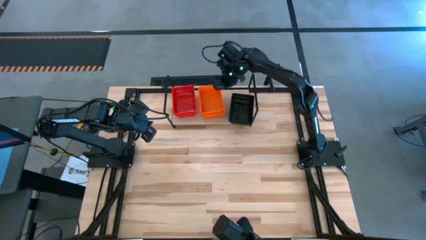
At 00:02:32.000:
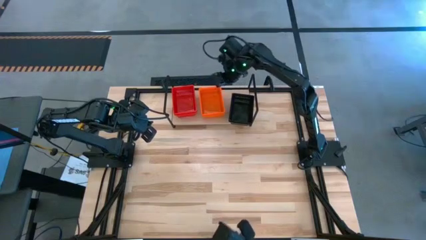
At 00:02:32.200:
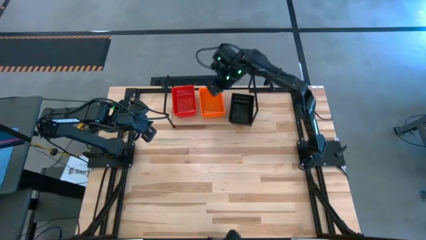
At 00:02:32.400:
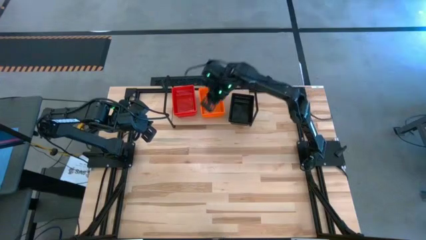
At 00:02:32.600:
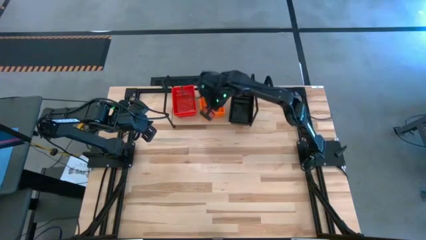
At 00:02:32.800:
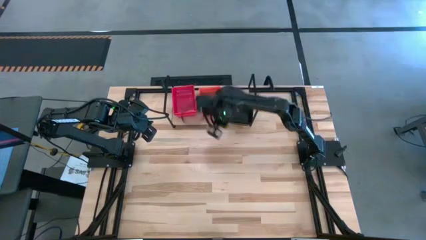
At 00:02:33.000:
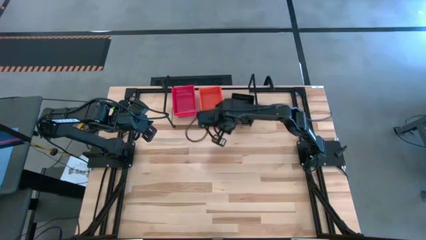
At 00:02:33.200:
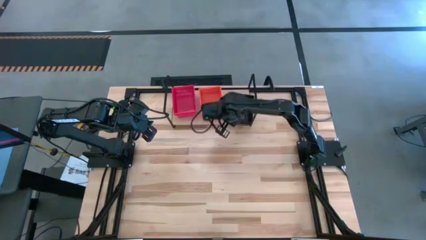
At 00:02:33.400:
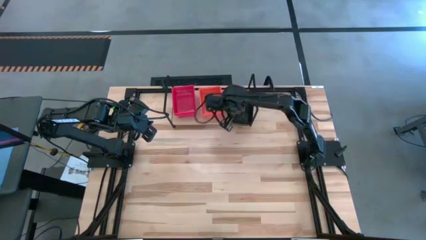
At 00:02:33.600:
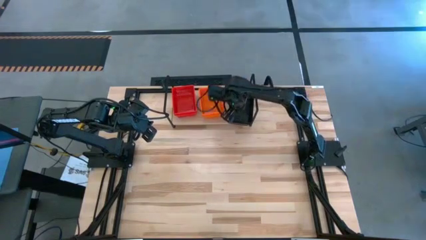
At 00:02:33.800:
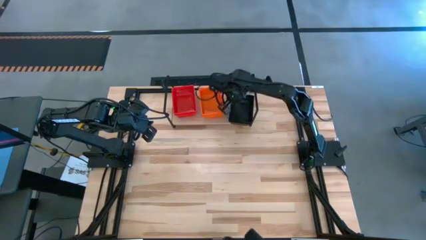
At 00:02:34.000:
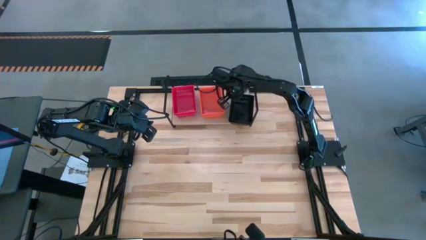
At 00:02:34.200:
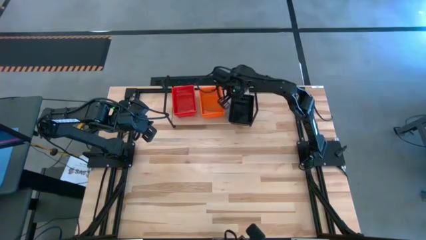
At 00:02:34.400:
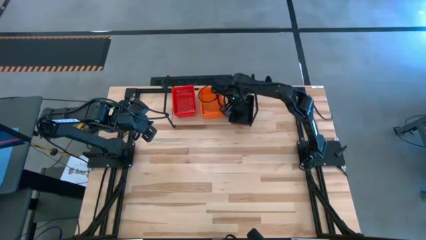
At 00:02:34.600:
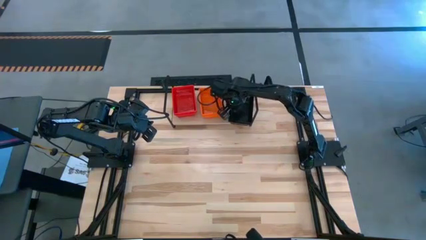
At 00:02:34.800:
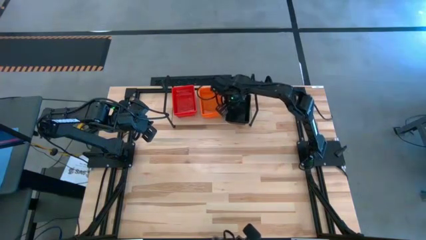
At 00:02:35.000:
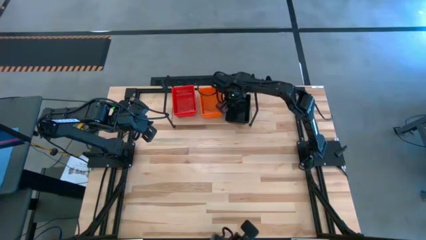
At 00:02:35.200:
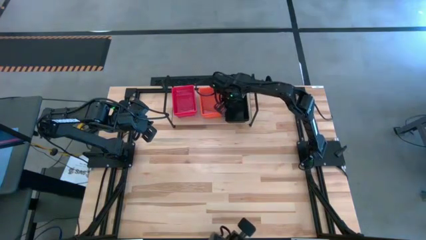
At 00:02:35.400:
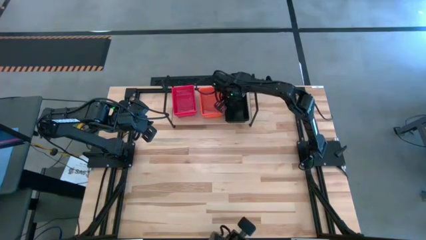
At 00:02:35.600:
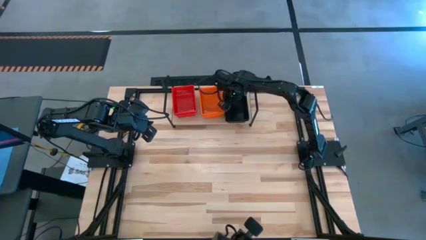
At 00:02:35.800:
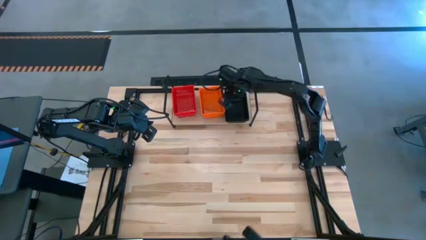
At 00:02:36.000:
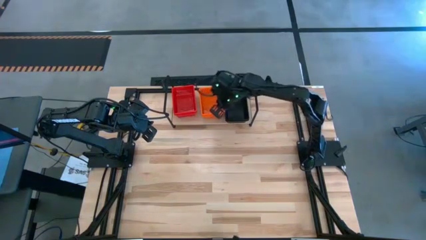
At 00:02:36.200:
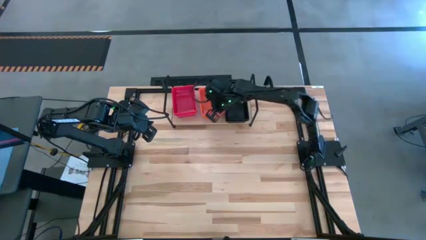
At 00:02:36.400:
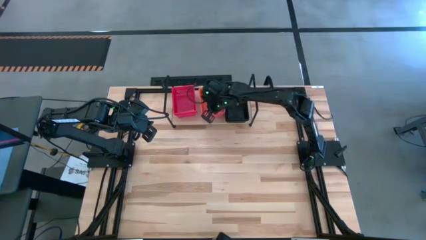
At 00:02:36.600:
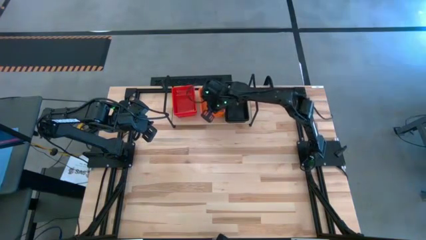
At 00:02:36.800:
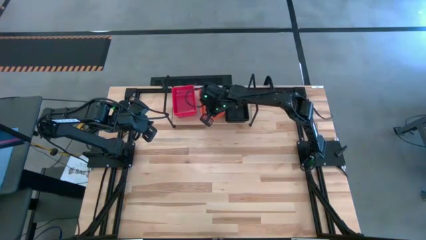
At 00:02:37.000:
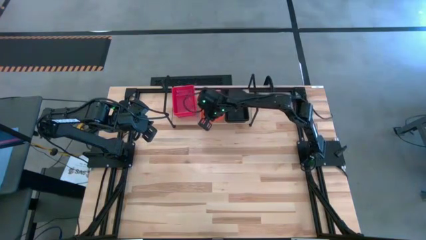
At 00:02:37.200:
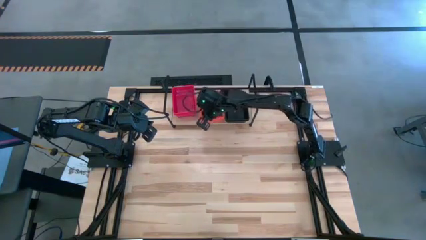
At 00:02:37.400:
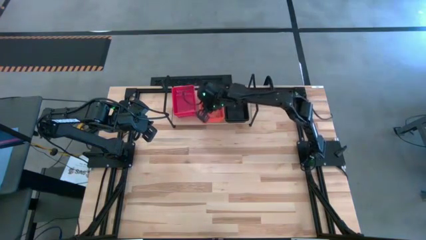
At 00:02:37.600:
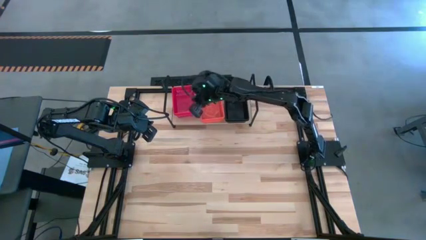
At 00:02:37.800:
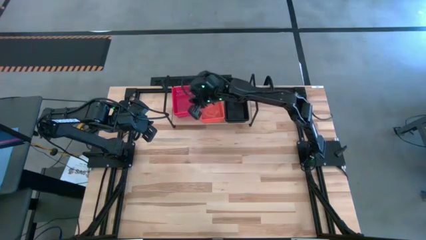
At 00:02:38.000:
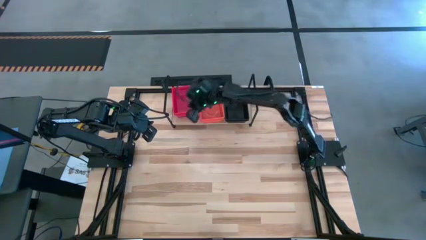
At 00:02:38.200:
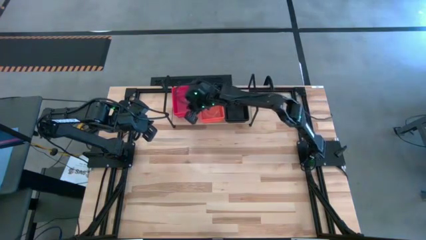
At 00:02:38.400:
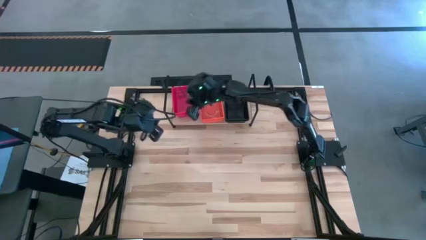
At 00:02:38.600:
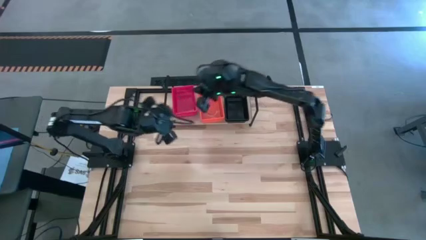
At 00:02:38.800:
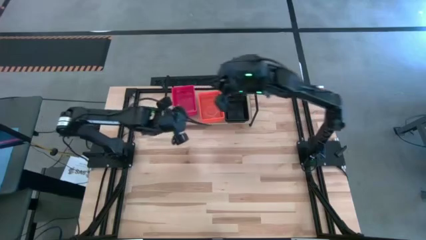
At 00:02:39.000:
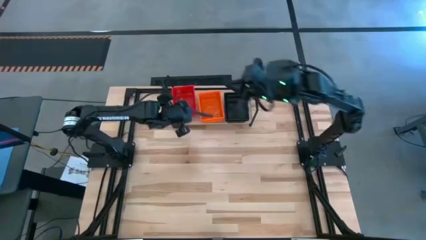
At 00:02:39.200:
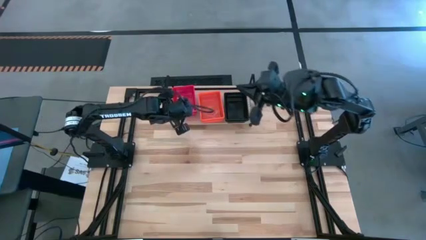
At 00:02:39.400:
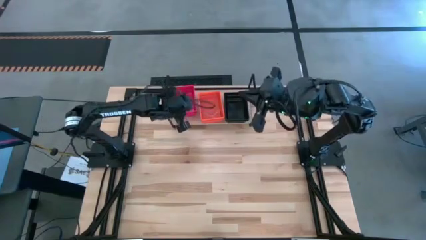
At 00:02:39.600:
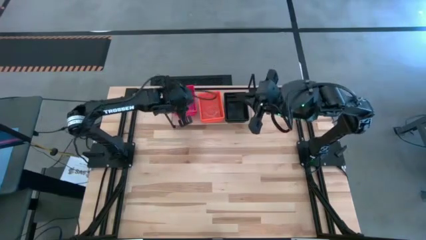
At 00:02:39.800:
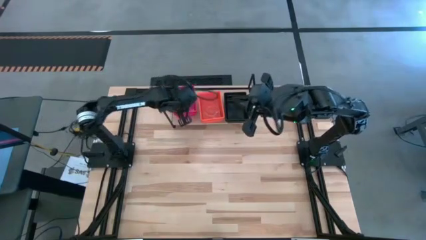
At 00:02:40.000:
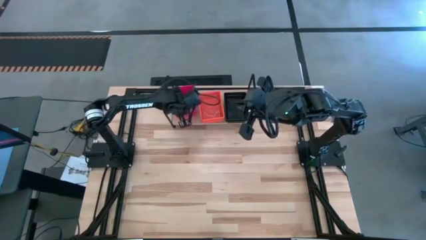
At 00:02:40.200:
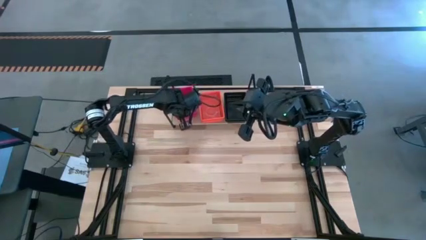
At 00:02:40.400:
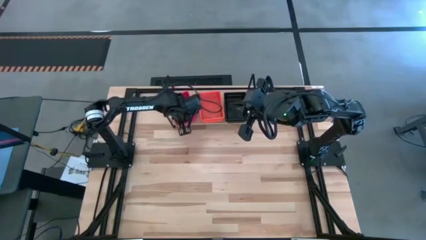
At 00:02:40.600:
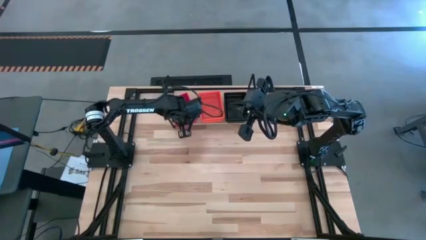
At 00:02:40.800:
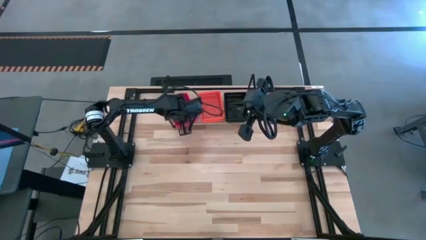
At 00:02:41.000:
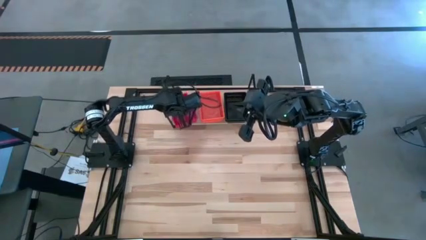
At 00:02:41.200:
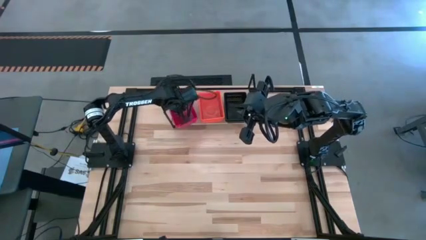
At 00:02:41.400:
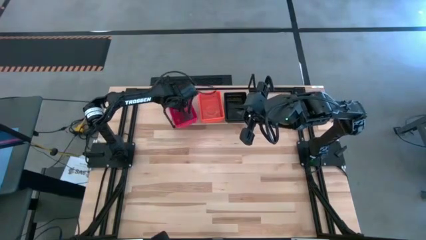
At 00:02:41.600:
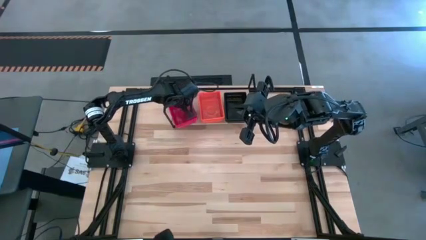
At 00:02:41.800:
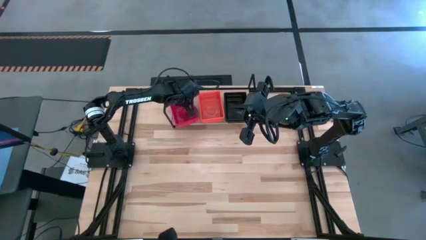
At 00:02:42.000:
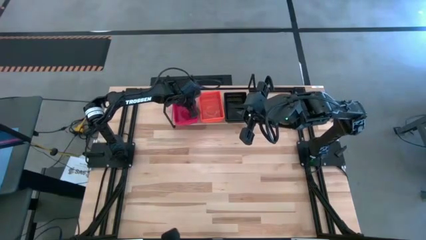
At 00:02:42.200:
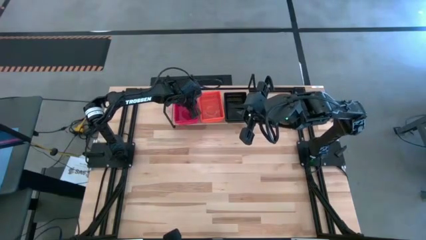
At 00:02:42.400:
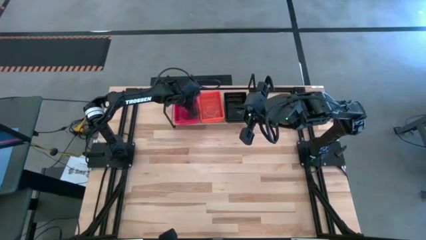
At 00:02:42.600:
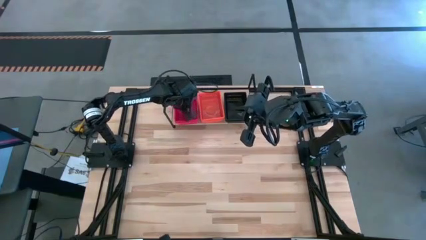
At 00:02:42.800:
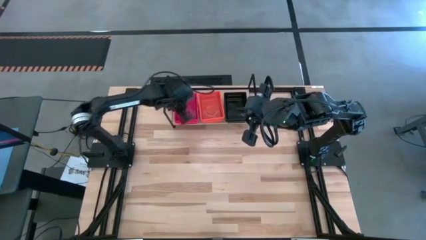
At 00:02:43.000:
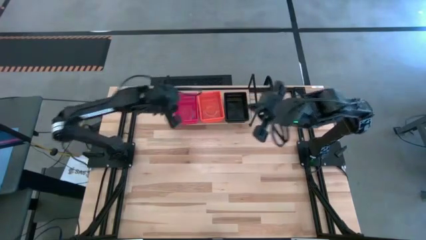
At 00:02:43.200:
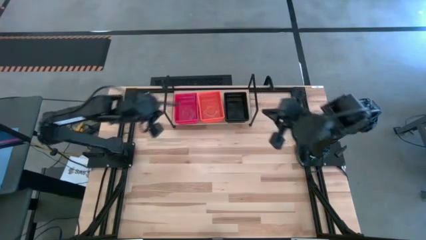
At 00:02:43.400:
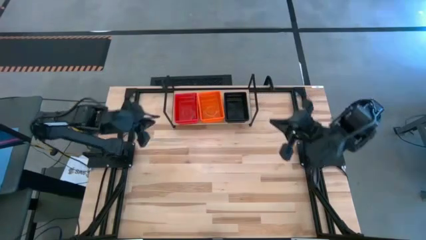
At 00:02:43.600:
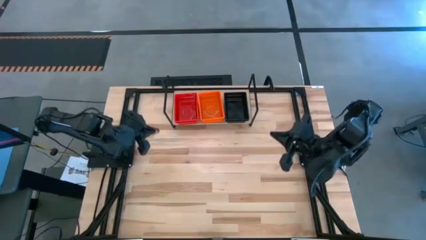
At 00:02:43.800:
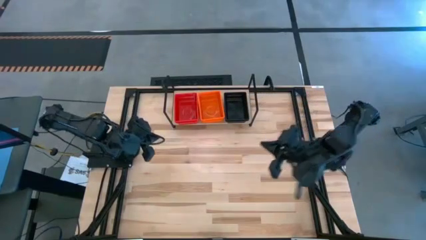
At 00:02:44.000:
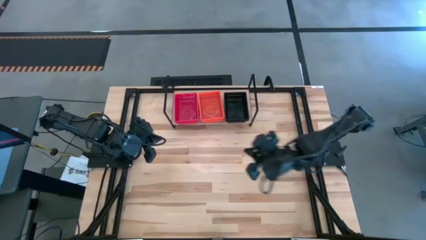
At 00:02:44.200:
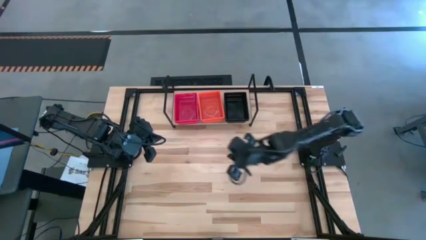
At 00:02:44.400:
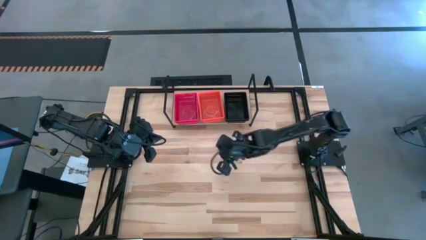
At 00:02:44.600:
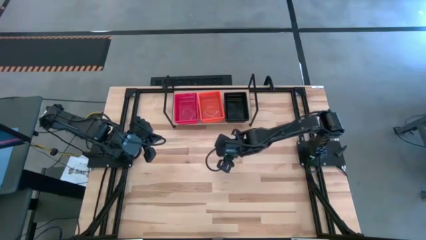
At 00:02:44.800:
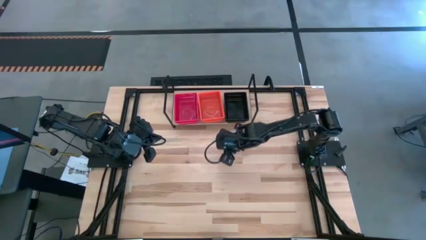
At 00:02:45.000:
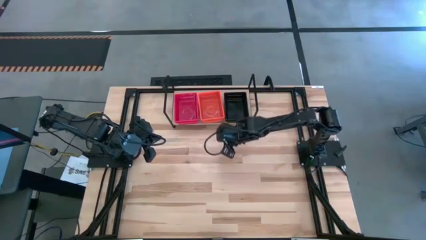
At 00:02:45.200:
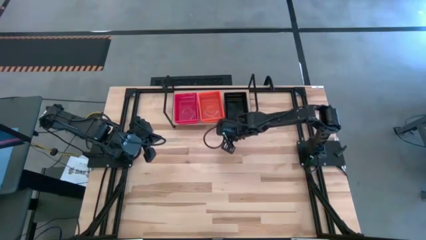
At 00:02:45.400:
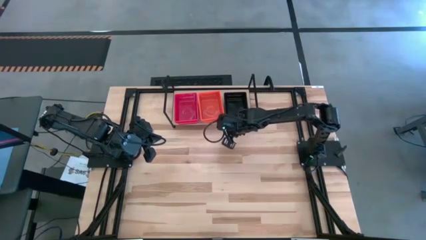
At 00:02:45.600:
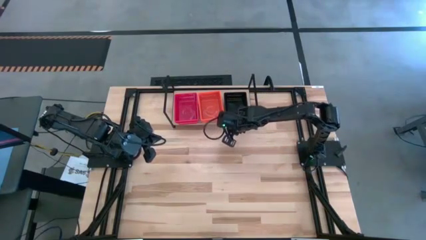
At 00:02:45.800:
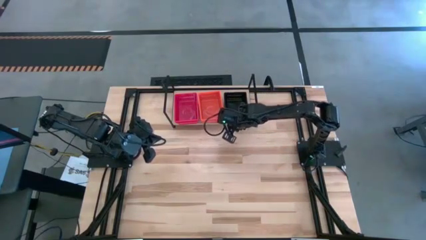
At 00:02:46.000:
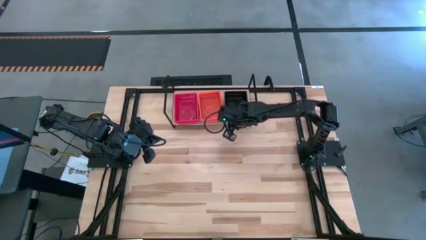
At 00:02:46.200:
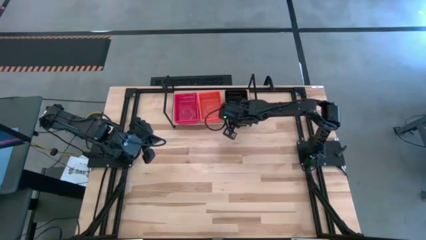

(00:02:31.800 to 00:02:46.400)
Task: Stack baskets on shelf by color
Adjust the bins on the shelf
